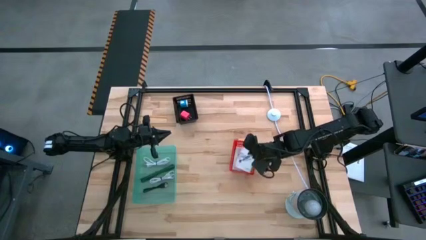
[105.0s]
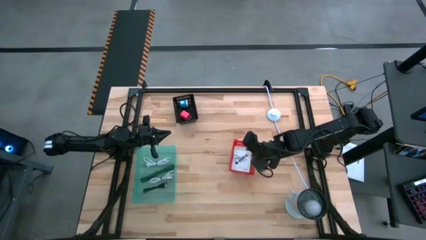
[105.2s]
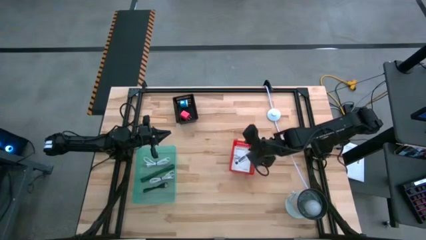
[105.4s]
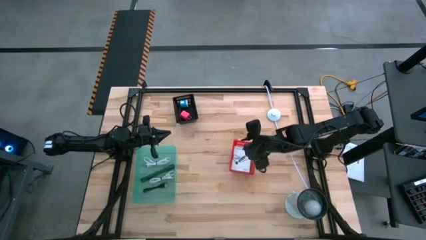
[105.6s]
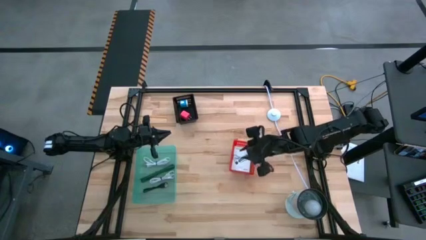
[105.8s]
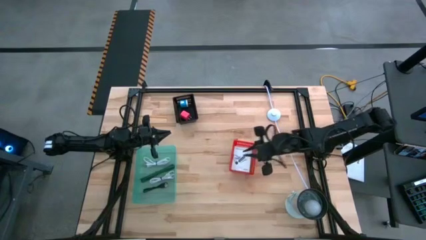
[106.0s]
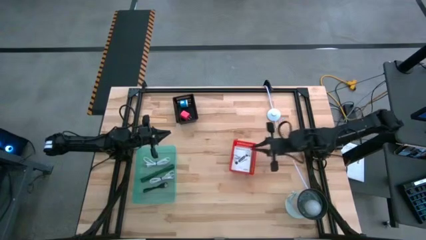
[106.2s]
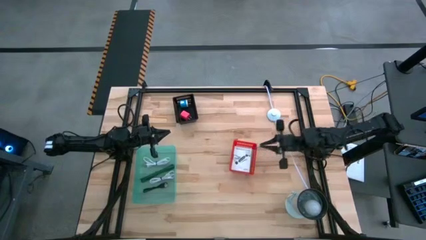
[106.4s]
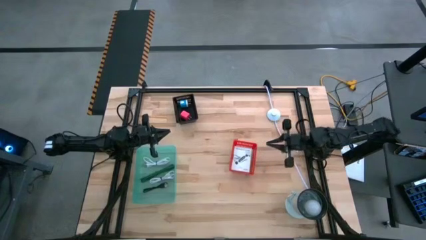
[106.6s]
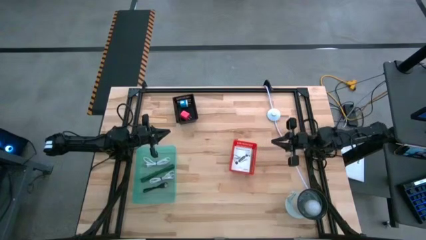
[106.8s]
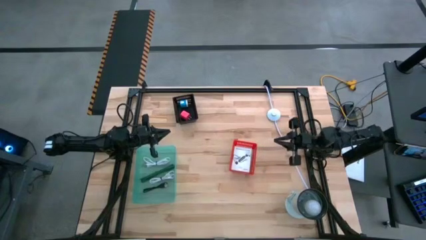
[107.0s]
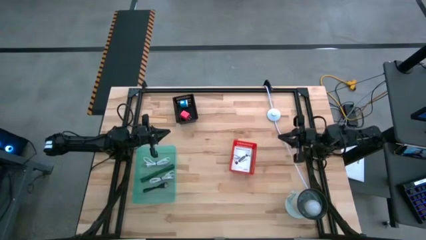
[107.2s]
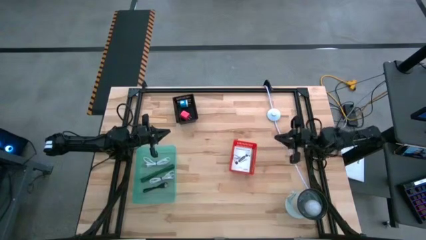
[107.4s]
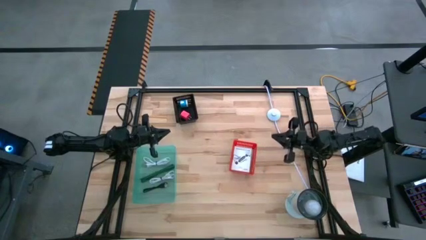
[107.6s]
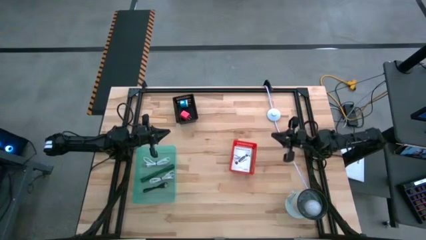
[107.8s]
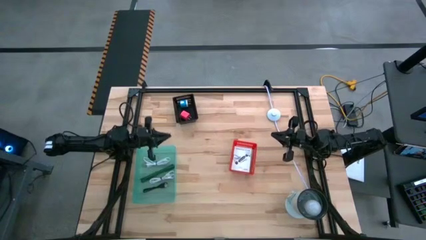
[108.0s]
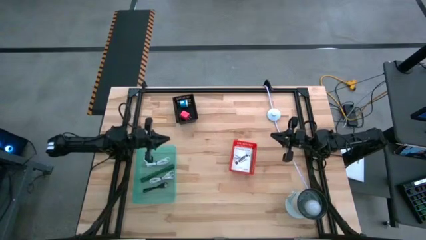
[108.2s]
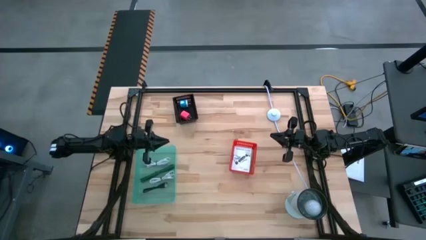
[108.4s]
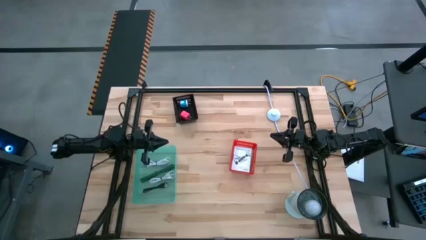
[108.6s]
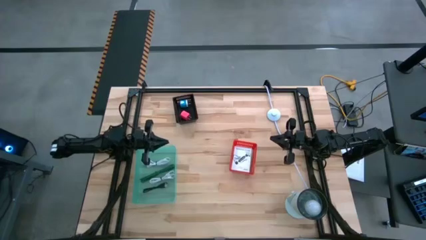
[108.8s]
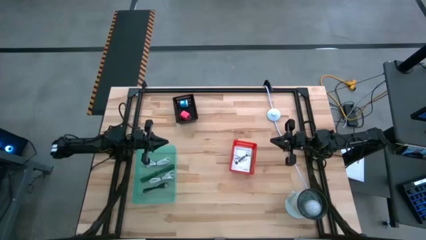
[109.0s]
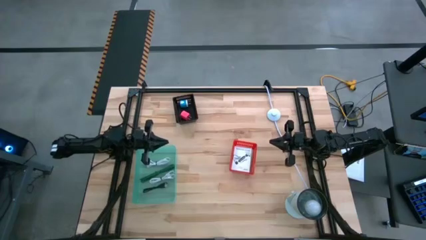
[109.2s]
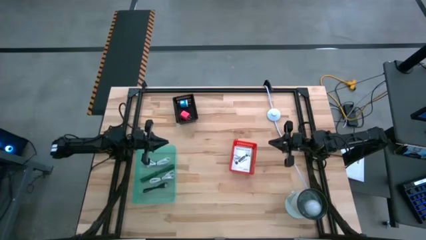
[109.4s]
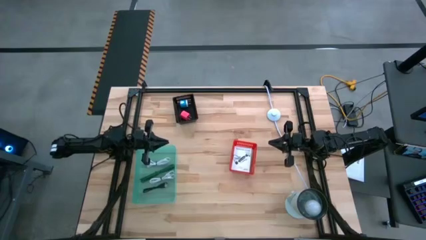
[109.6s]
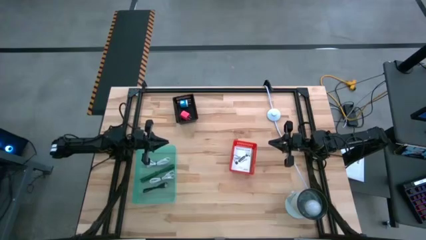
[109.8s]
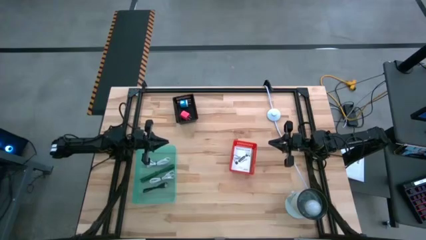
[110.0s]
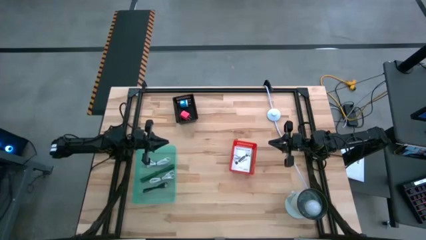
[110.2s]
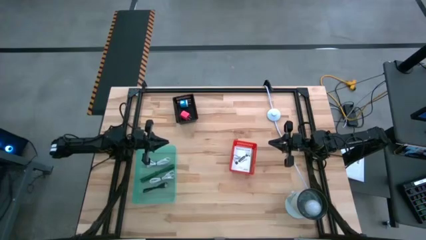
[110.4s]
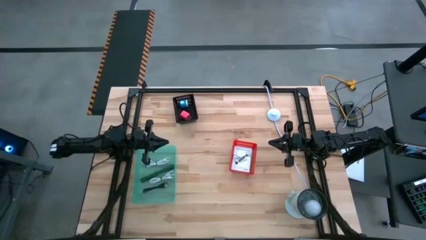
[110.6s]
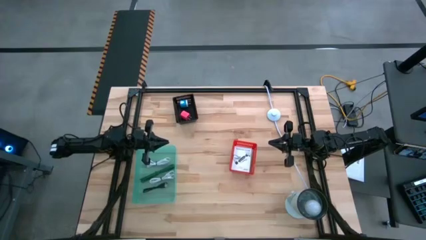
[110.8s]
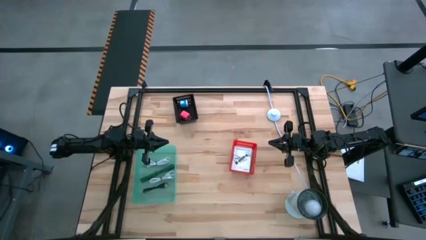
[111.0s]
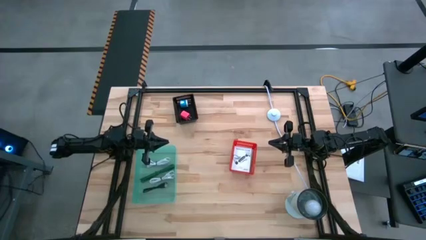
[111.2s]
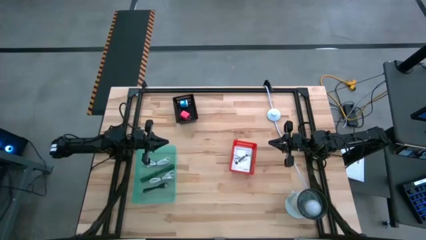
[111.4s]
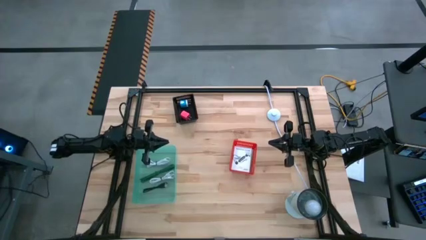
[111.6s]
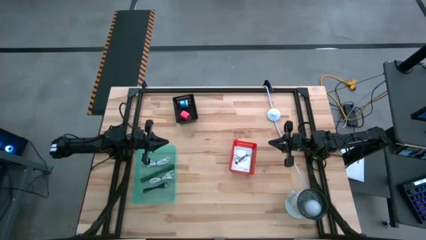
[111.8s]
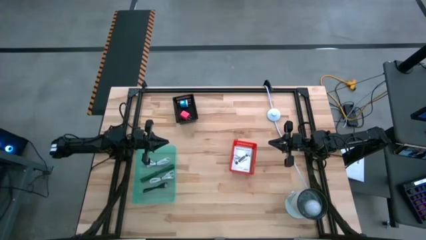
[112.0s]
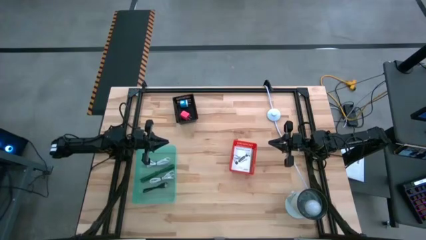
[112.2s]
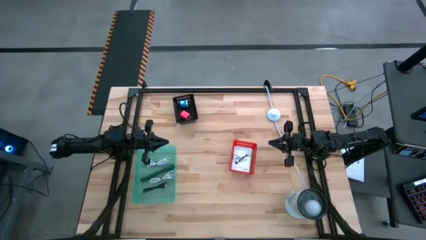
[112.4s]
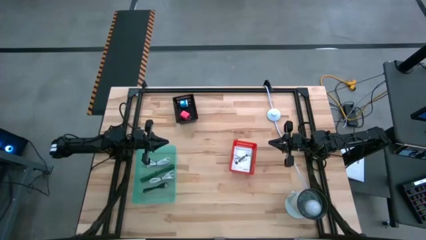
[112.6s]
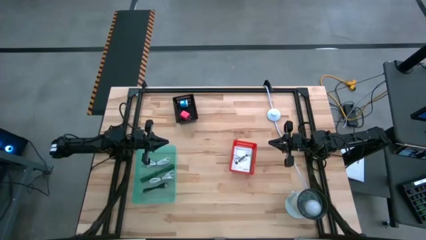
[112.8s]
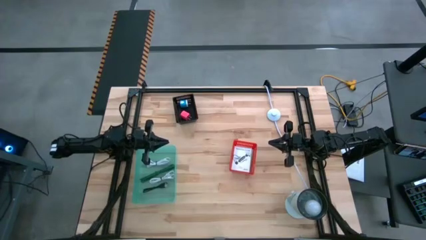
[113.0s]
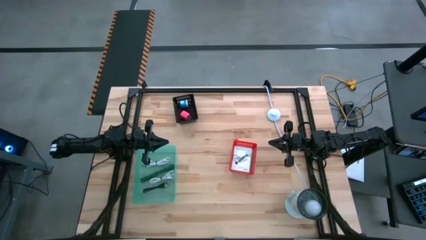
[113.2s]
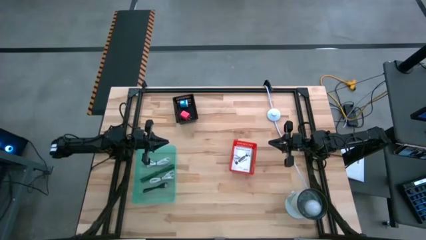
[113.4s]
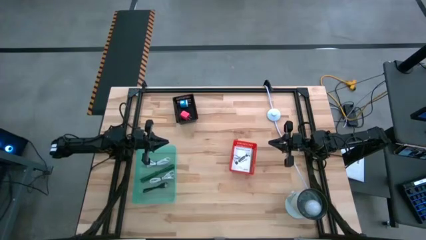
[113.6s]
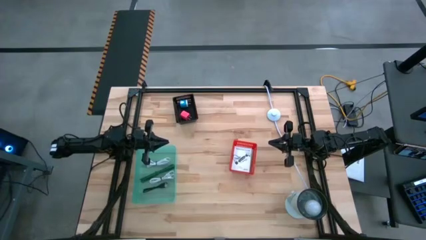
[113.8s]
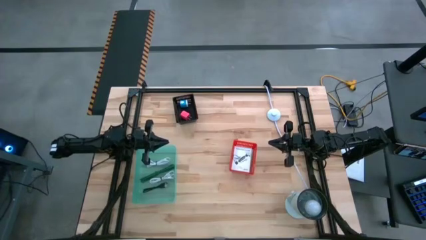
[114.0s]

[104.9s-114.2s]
Task: Pick and place items into bin
Return to Home Position

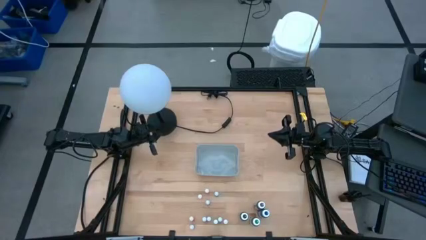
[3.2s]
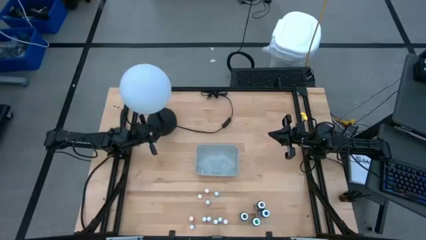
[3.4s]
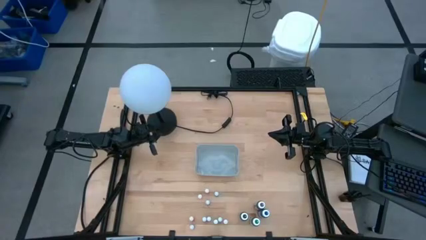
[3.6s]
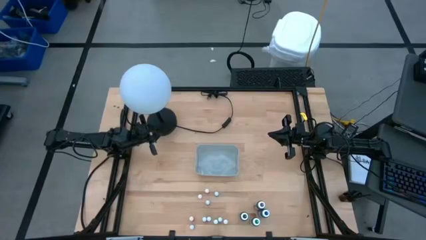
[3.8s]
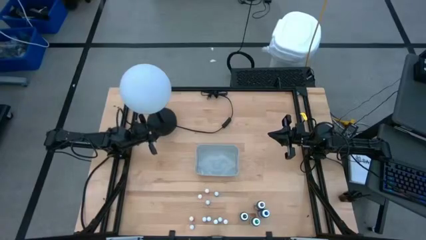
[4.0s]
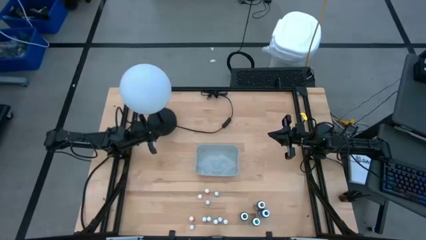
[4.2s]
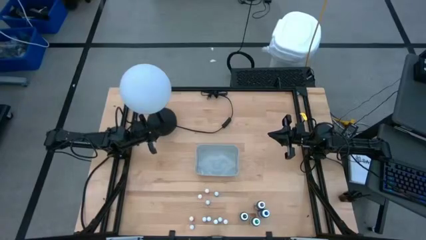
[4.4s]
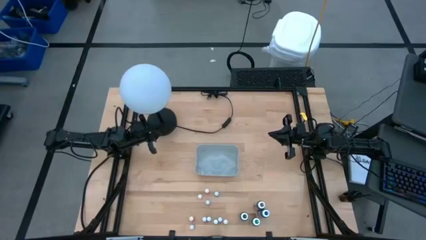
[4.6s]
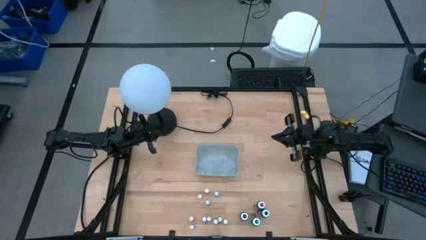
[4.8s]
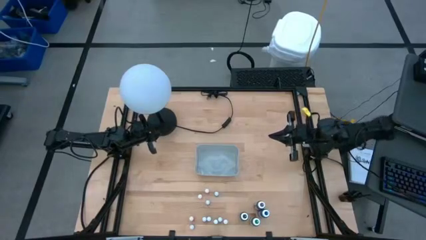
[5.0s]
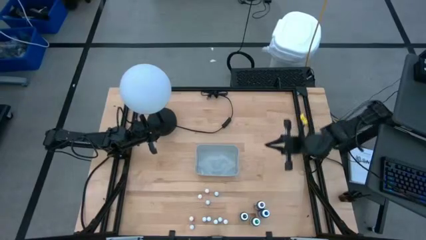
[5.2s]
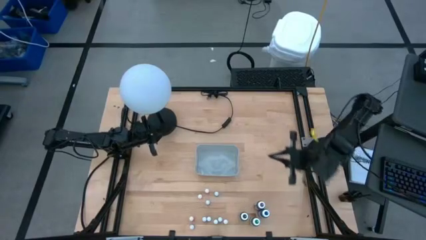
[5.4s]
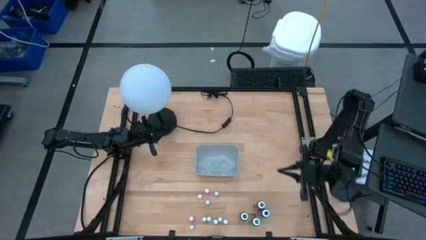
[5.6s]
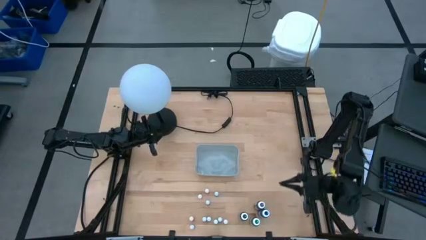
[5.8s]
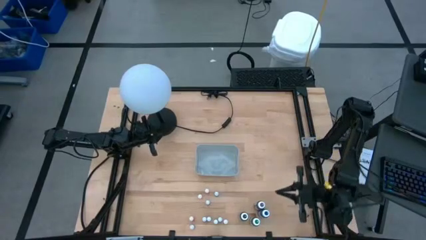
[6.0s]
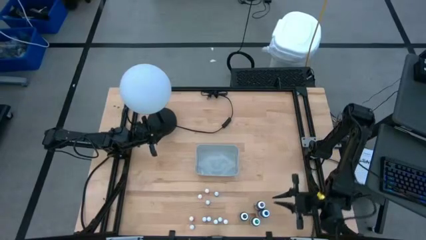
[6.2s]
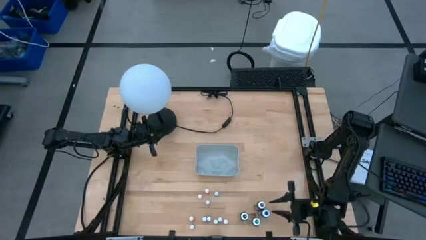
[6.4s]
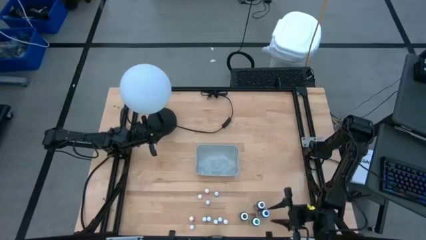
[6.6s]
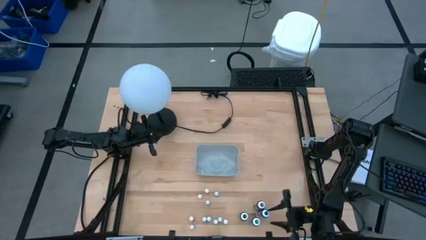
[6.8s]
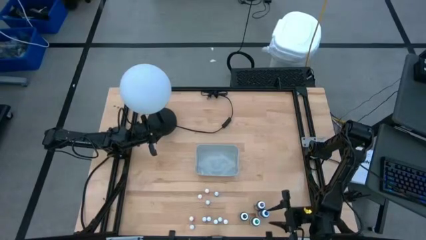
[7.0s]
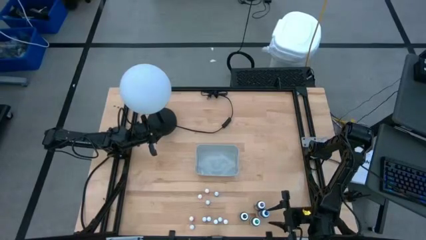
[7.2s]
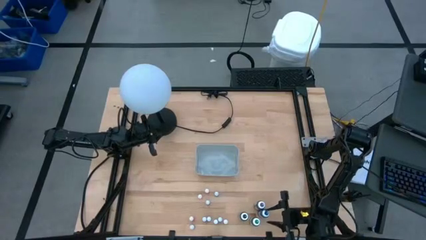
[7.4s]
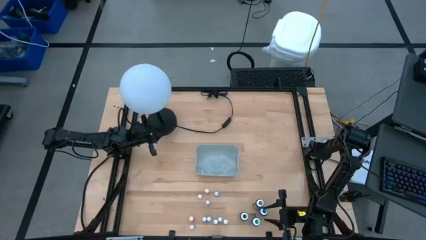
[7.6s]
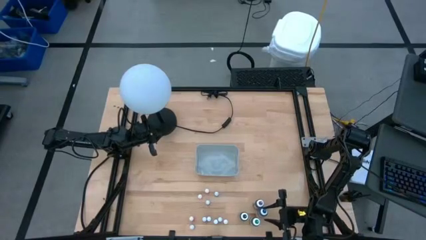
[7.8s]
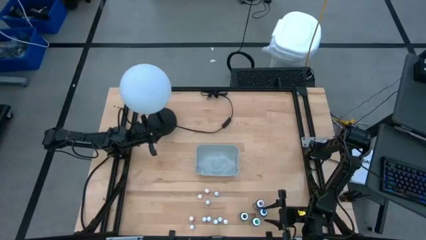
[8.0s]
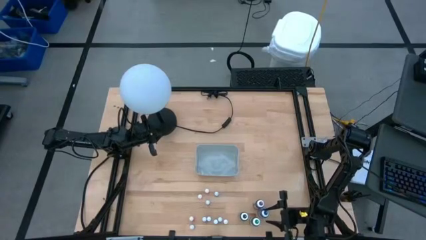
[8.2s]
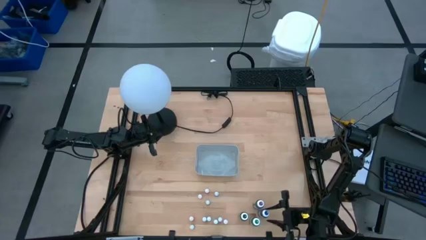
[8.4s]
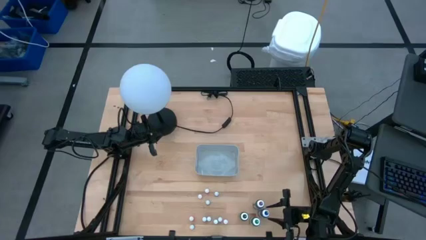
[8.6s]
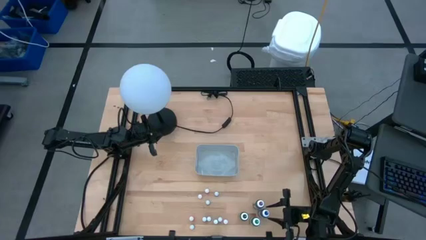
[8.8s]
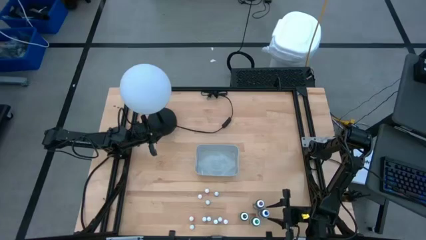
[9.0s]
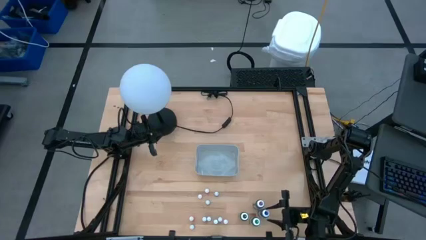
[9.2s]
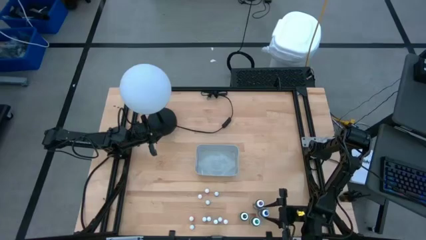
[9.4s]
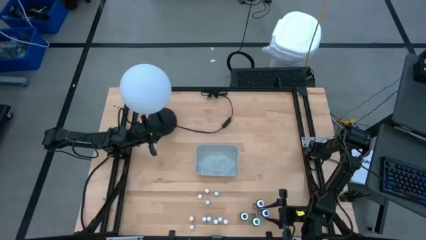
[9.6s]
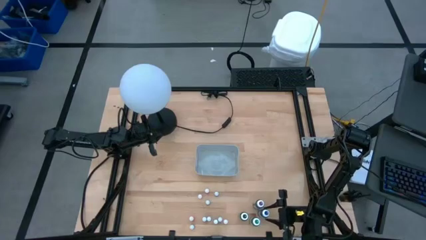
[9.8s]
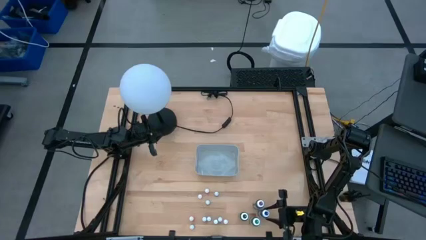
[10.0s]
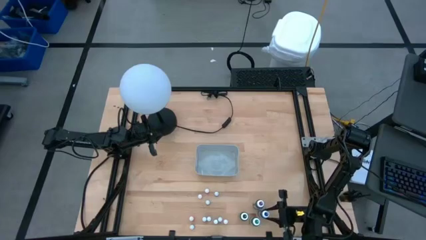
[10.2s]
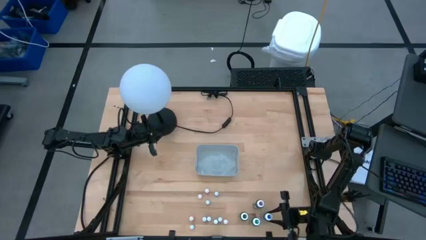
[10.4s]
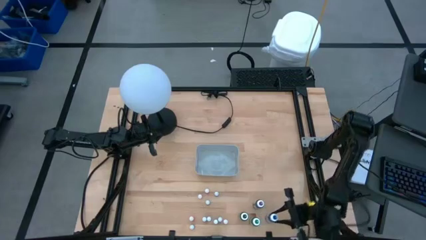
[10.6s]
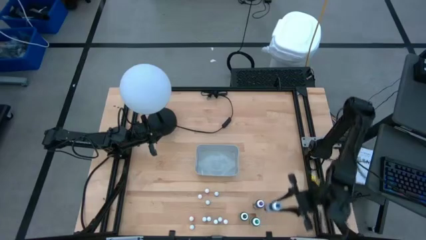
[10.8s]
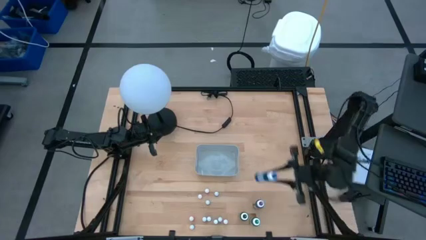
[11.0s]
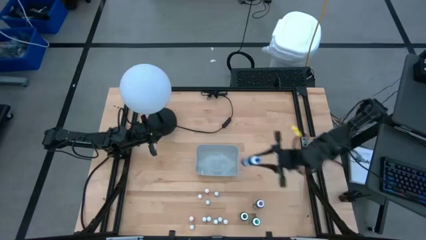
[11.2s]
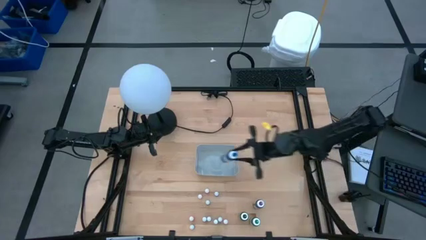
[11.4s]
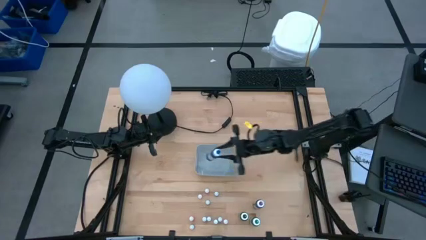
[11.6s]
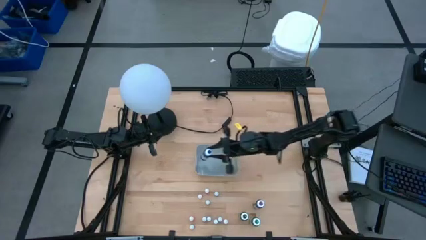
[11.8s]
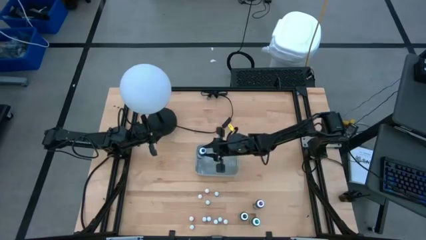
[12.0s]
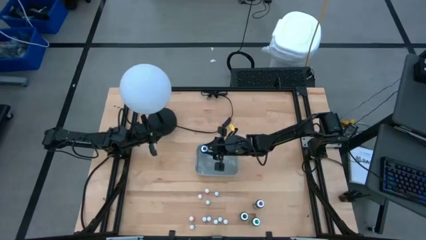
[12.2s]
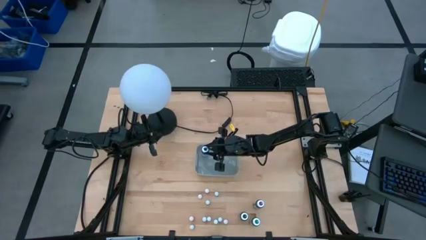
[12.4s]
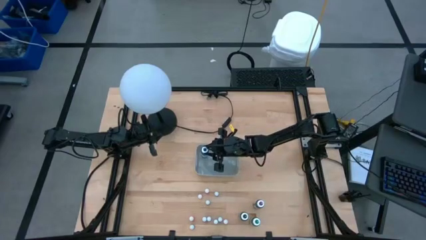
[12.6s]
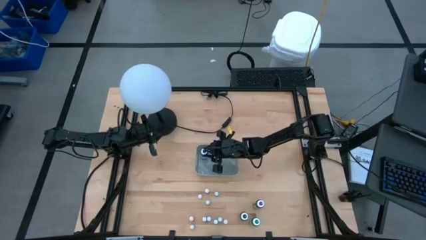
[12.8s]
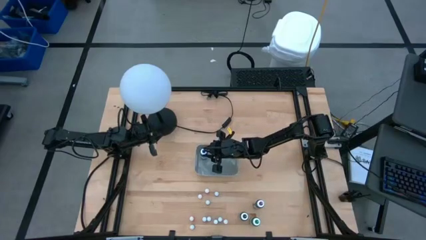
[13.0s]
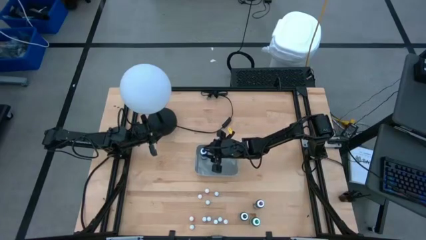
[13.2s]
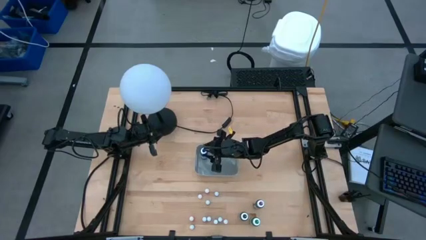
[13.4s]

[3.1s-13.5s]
Task: Pick & Place food coloring
Put the big blue food coloring bottle into the gray bin
